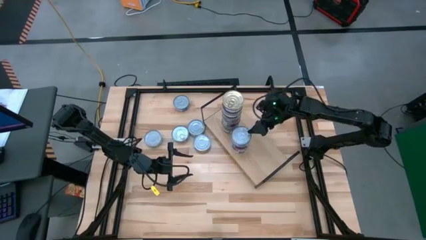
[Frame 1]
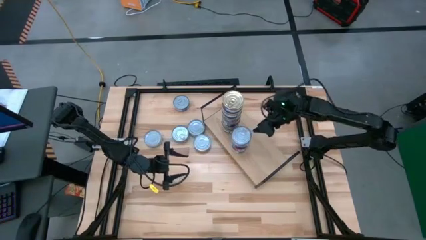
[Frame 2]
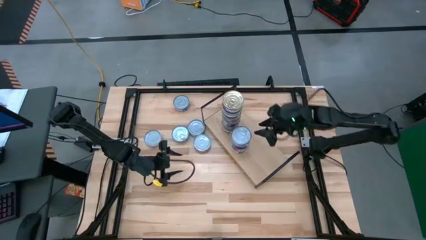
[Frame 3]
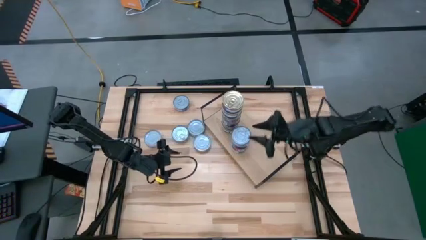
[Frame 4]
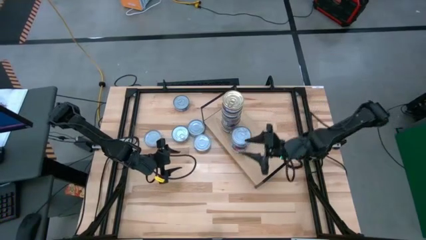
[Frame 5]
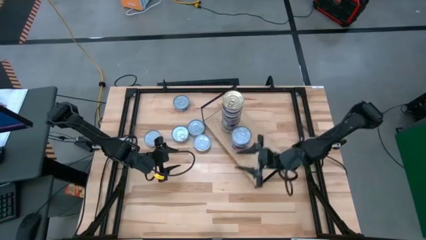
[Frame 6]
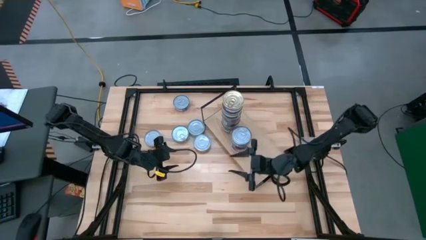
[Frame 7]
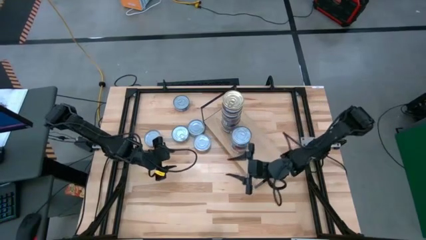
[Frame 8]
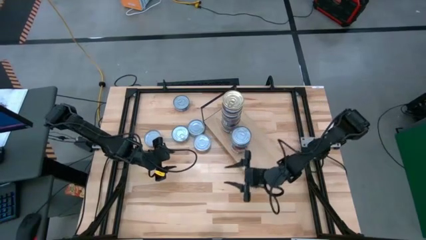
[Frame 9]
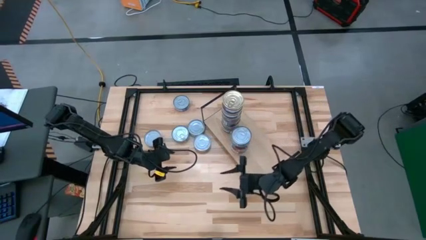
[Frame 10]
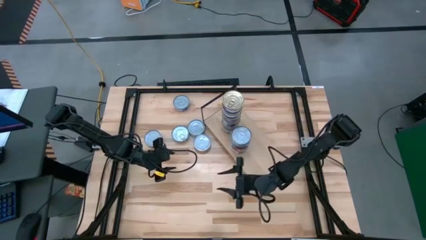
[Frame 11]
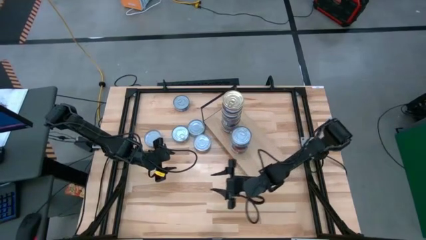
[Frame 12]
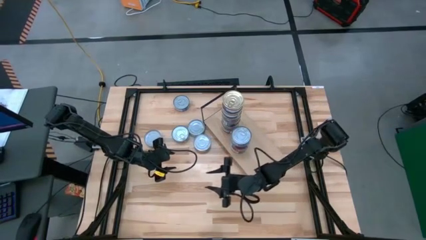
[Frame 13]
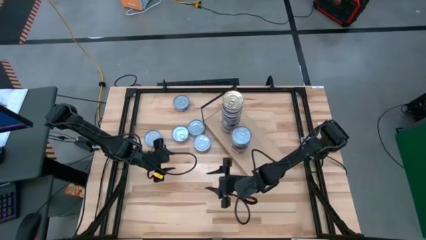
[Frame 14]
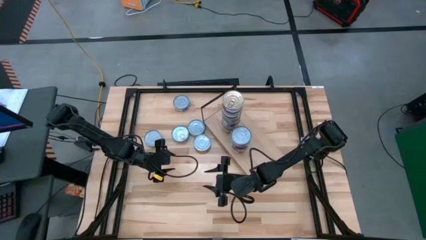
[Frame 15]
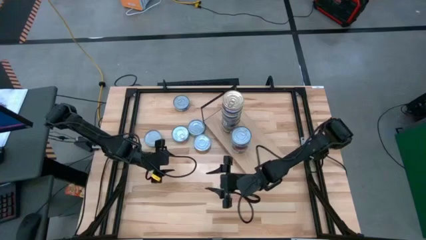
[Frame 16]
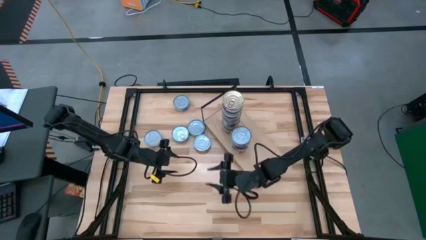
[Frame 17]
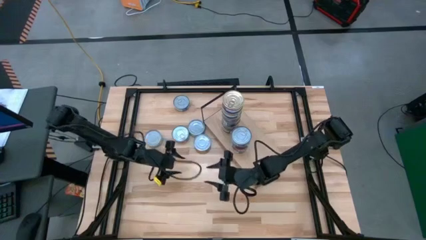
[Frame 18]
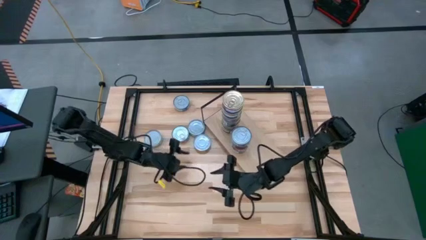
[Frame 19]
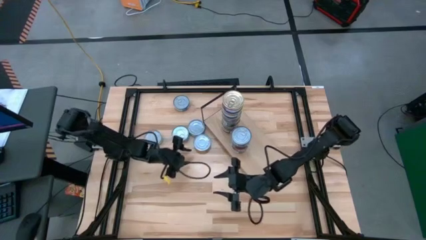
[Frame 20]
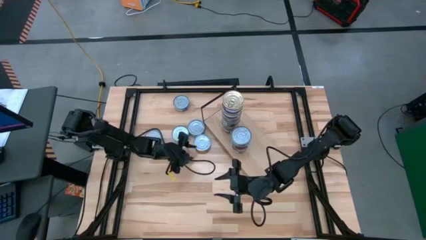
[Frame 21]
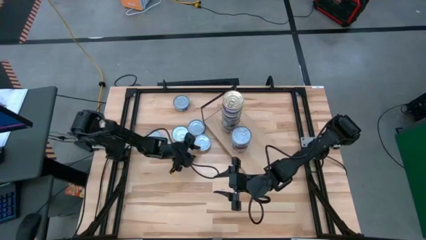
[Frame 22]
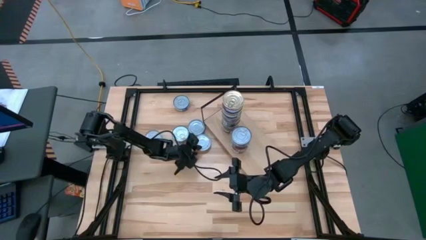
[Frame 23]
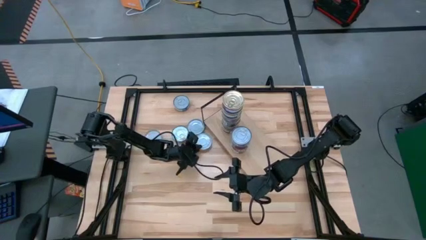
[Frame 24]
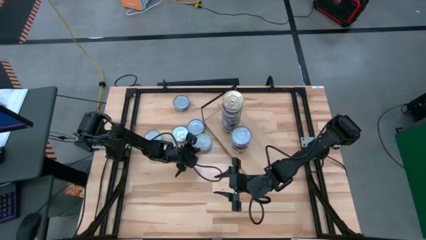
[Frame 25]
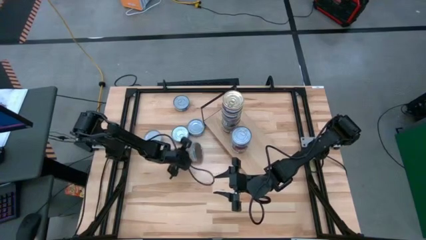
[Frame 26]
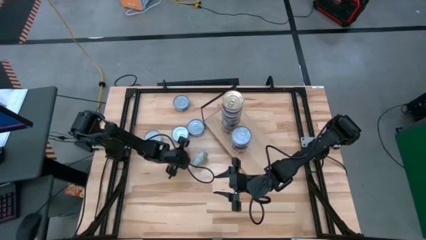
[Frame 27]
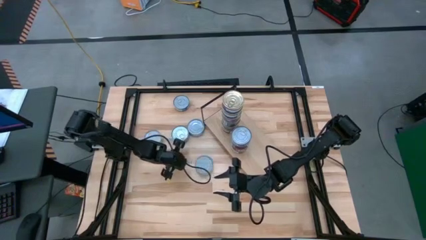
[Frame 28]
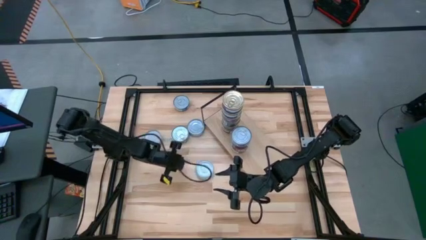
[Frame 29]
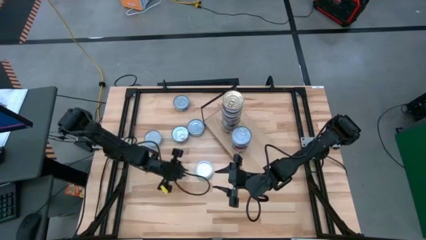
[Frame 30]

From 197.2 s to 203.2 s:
Task: Stack canned seafood by type on shelf
Put the green tuna can on the shelf

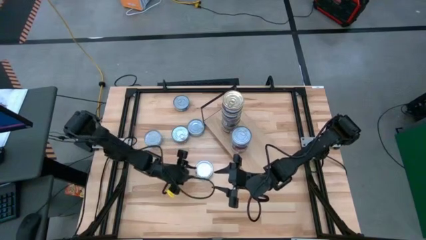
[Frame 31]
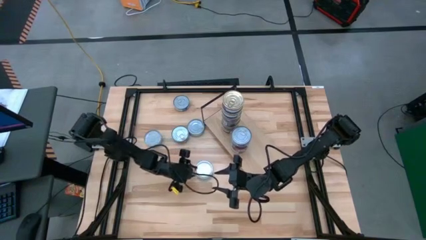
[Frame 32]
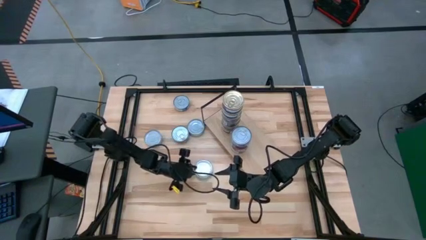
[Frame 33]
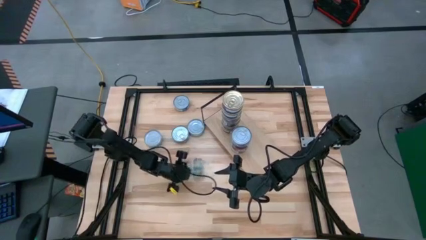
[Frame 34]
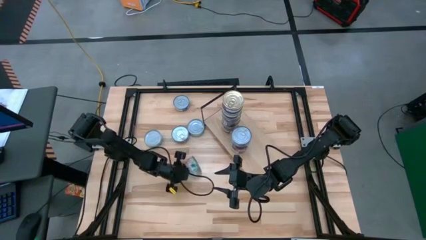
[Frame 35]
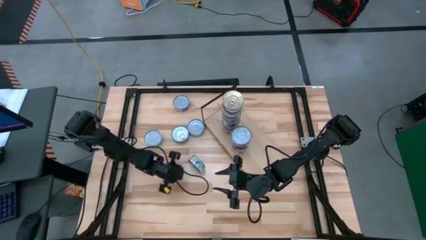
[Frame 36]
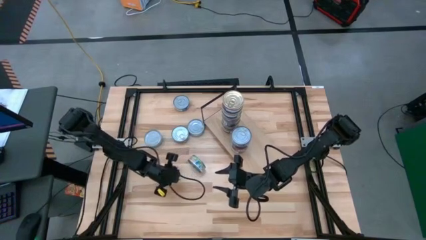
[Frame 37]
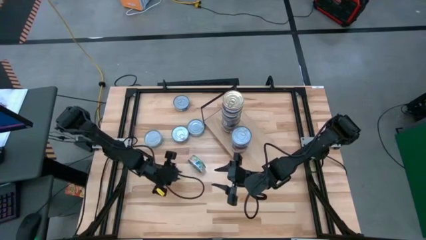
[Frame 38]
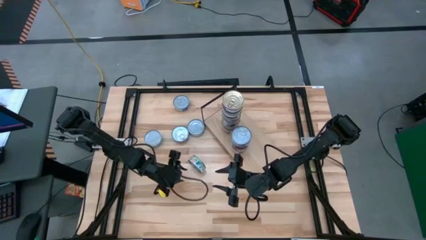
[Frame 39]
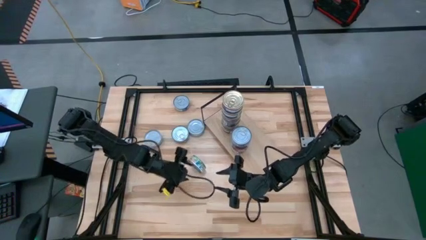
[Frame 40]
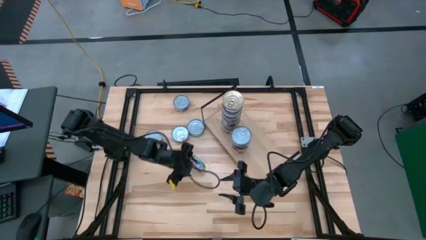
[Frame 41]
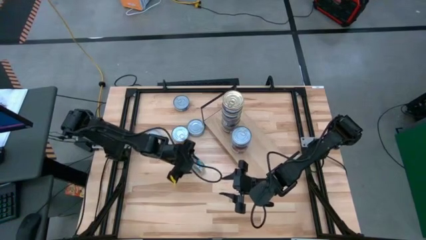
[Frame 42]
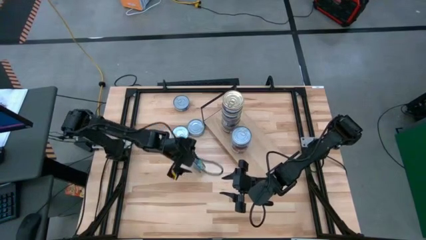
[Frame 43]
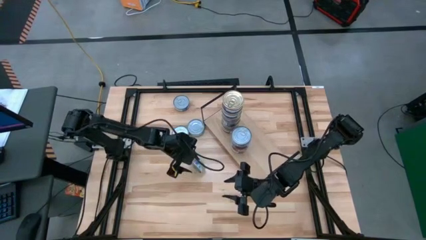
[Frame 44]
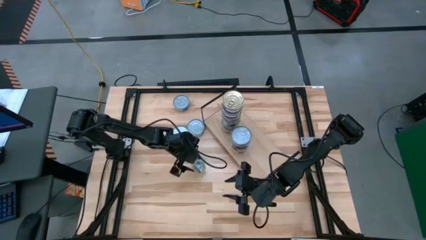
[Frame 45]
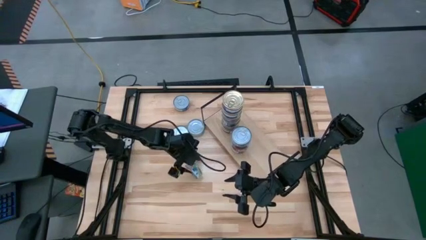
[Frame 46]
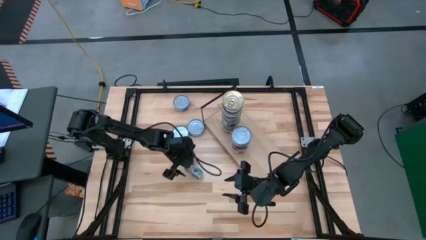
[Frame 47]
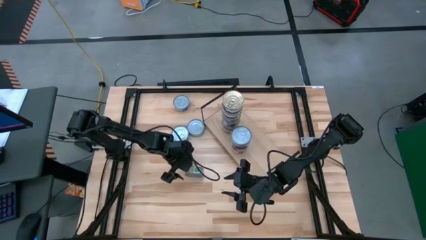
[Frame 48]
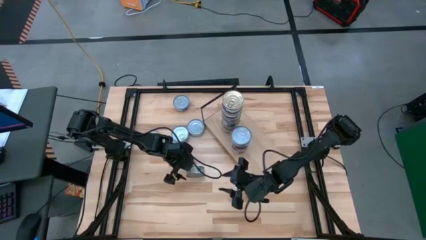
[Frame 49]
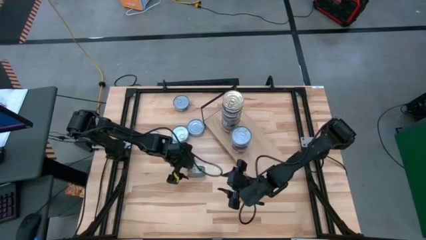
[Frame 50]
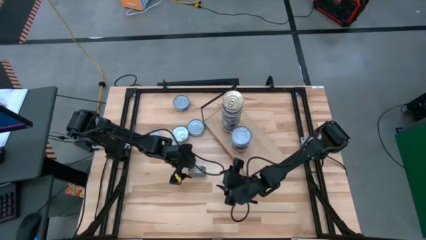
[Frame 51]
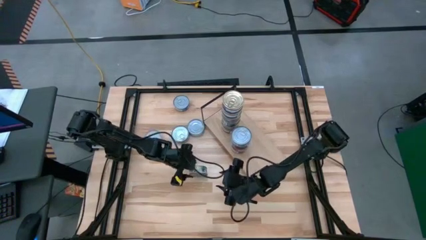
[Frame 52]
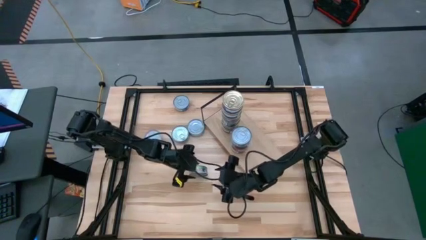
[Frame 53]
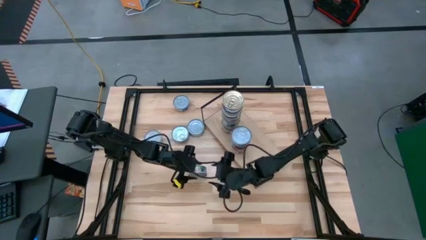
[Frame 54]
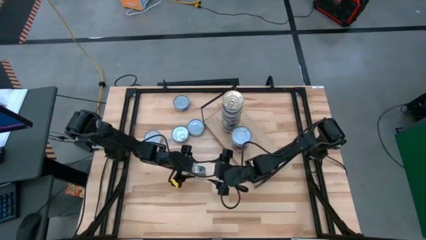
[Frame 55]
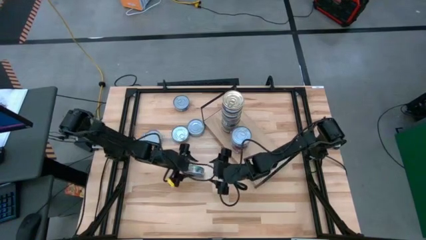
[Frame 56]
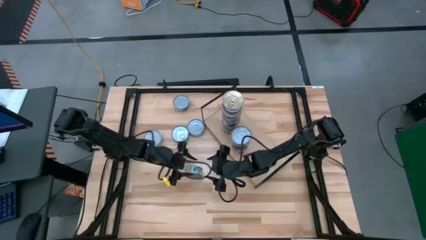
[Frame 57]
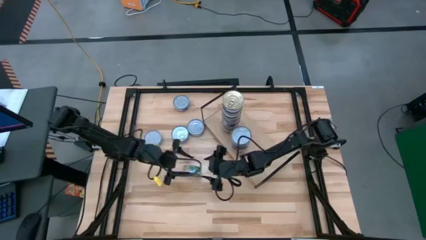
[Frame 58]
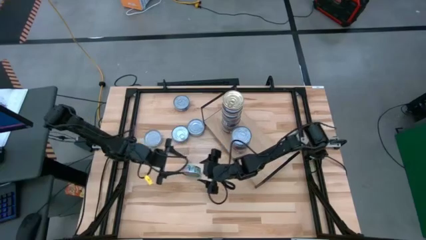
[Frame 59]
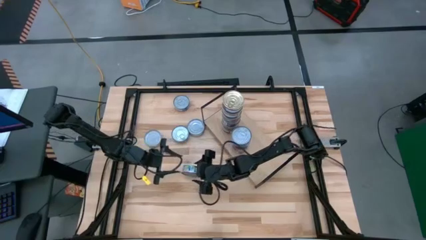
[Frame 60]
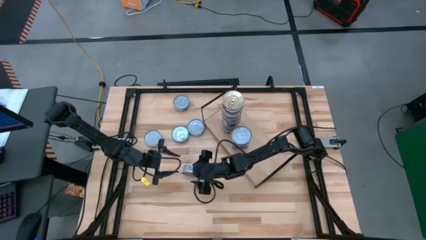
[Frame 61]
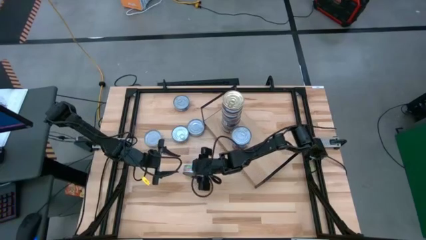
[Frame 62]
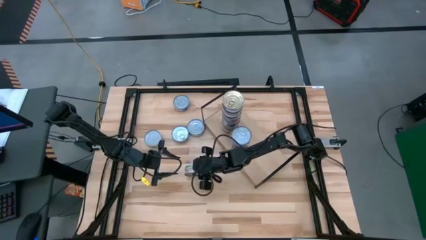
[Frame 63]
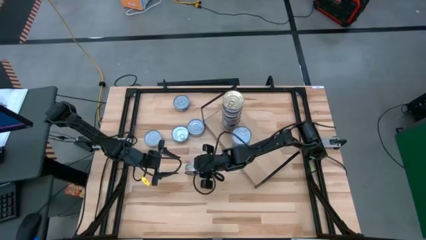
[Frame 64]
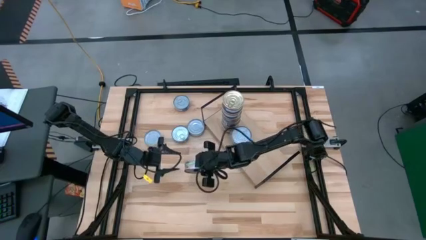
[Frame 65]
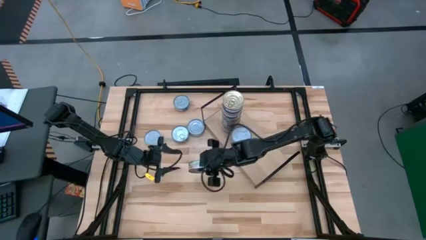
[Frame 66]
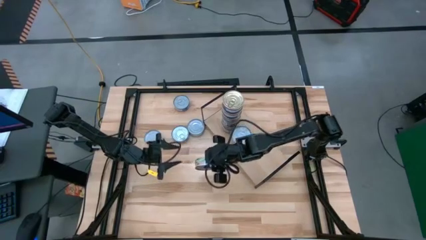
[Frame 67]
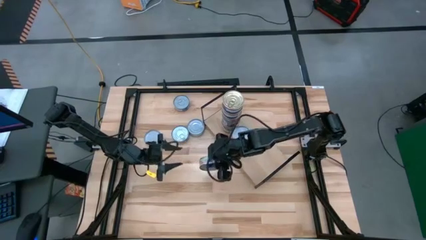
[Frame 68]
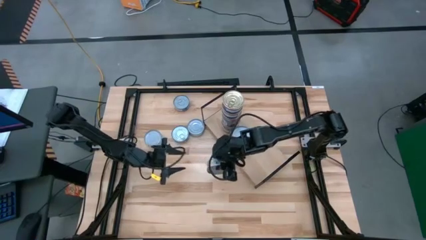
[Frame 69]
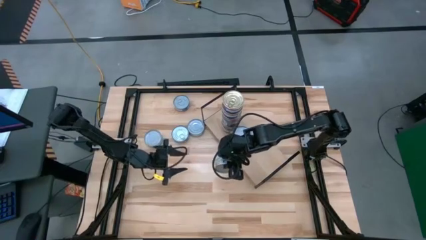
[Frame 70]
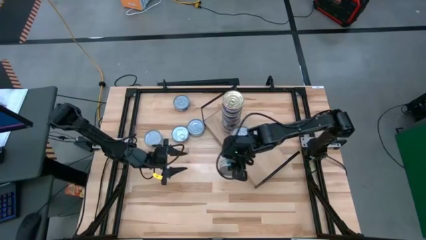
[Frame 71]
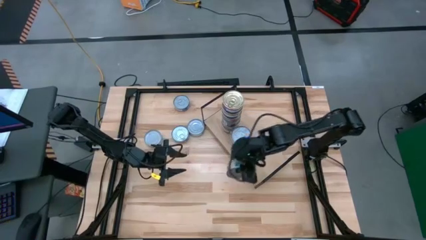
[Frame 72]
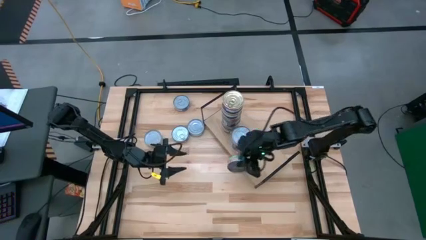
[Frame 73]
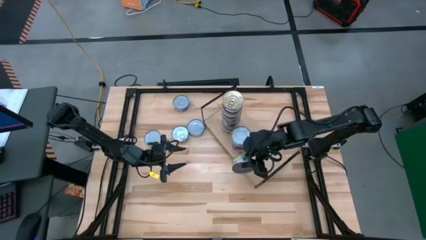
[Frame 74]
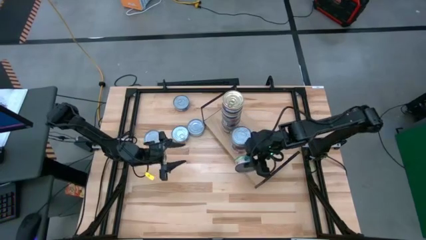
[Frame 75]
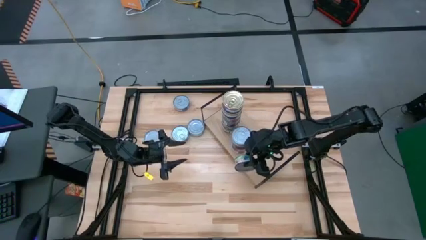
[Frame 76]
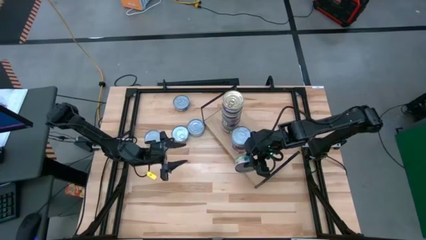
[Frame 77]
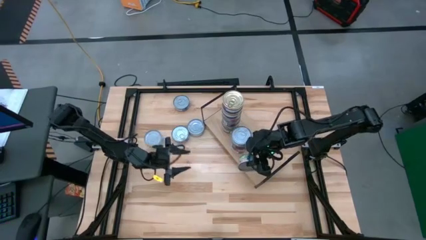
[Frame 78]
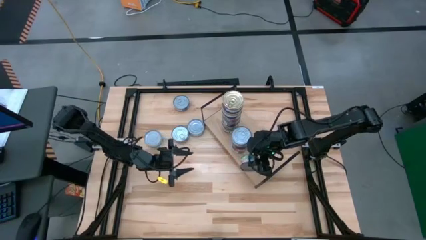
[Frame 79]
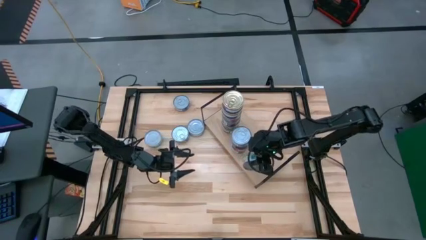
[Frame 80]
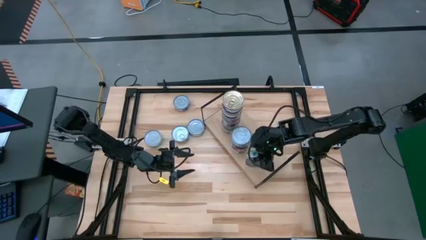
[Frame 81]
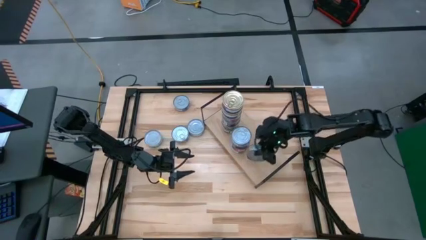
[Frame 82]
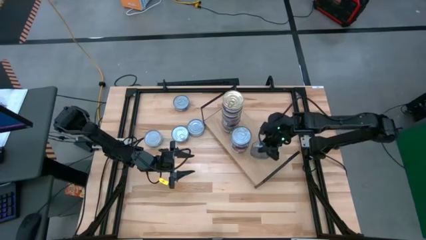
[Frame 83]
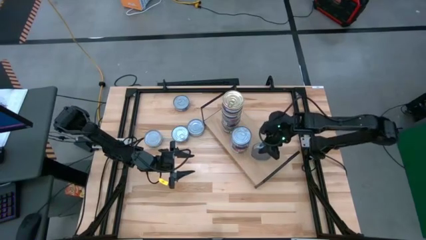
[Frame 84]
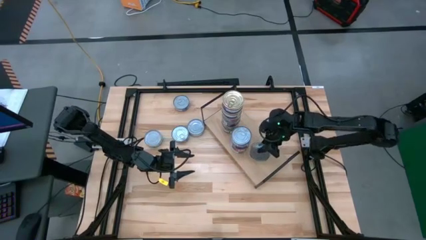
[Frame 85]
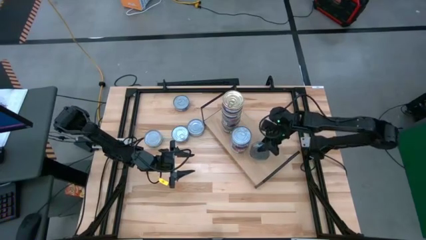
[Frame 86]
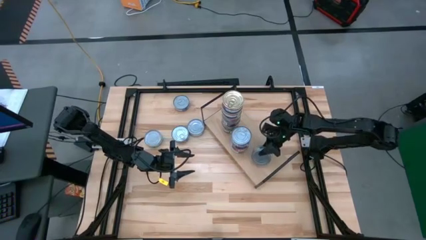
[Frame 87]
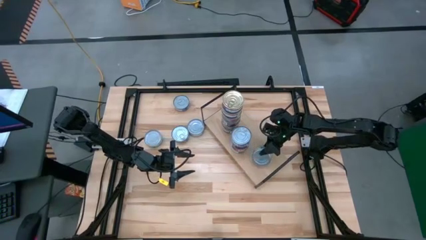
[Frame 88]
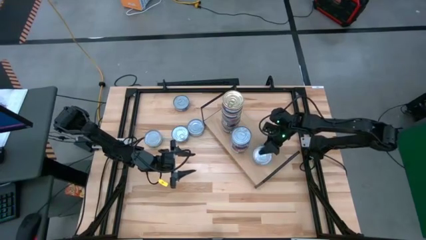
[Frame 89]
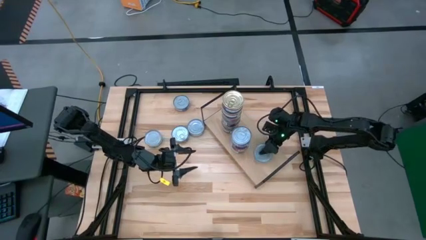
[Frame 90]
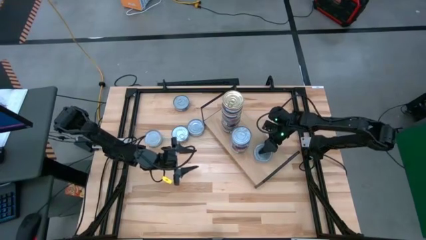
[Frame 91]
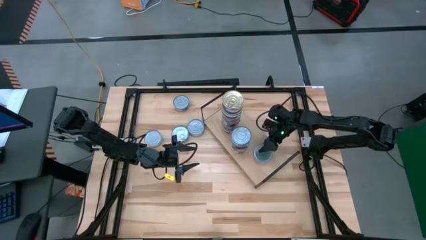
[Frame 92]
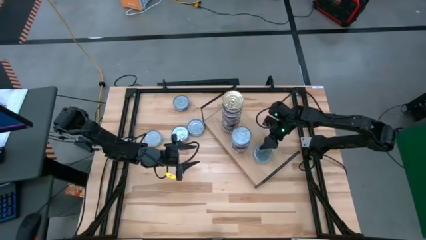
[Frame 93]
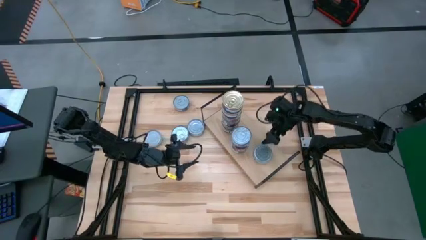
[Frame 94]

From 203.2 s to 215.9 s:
Put the green tuna can on the shelf
